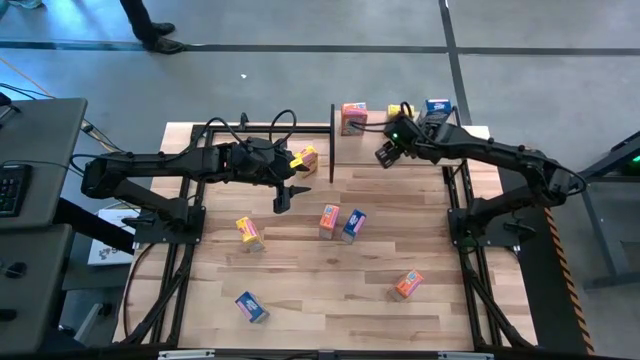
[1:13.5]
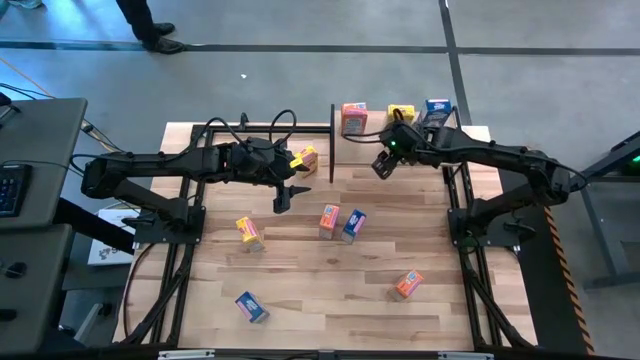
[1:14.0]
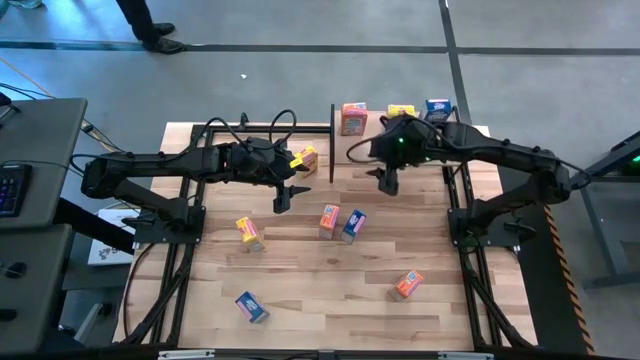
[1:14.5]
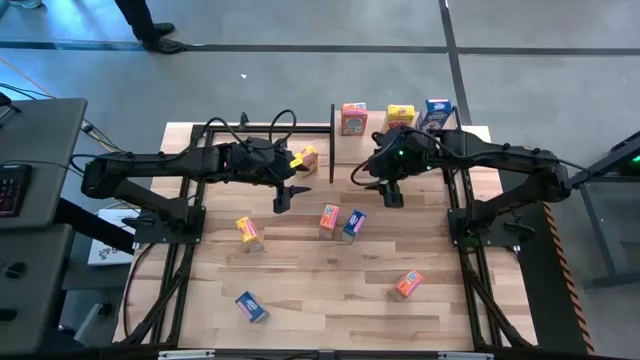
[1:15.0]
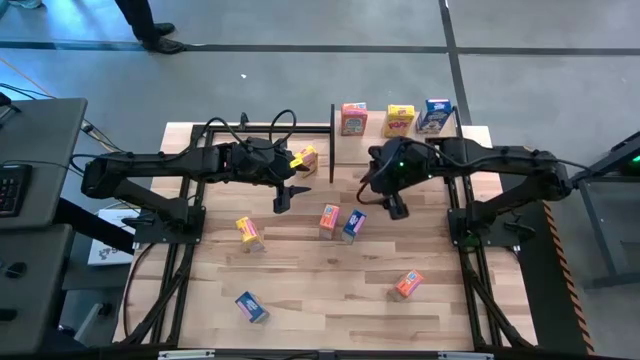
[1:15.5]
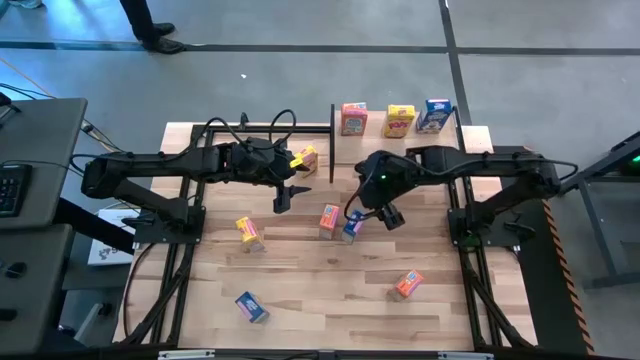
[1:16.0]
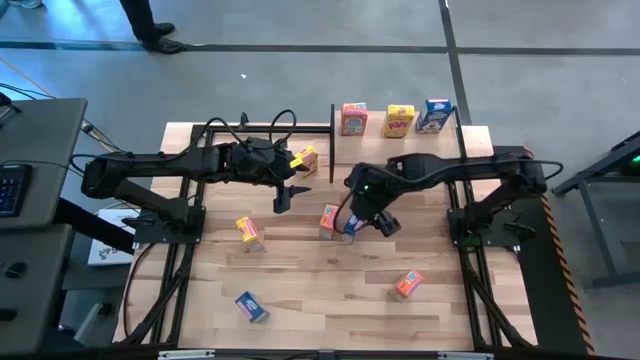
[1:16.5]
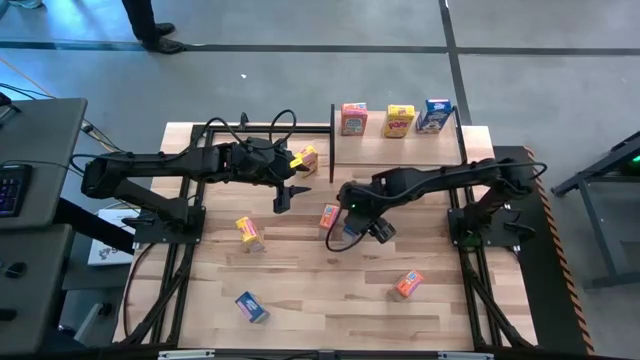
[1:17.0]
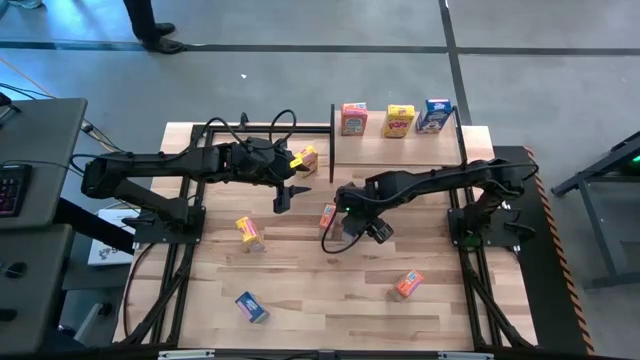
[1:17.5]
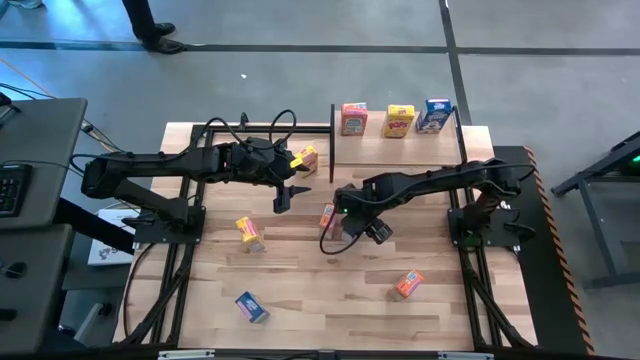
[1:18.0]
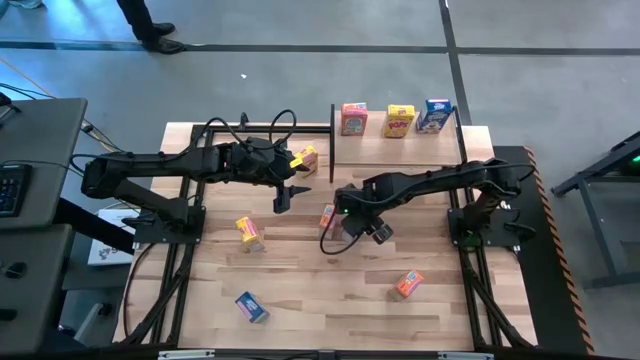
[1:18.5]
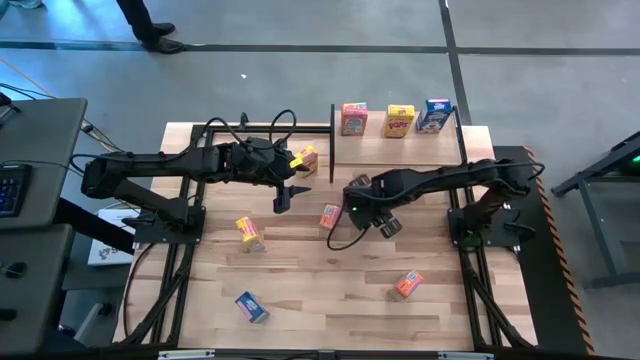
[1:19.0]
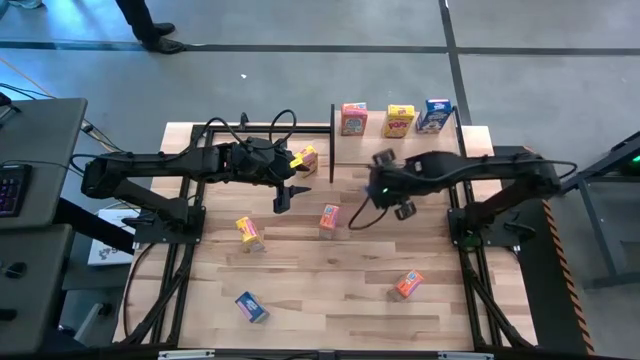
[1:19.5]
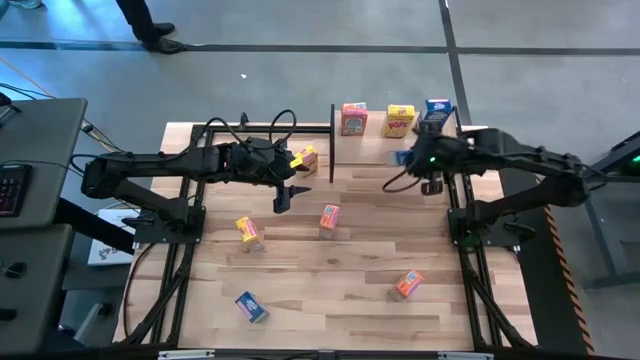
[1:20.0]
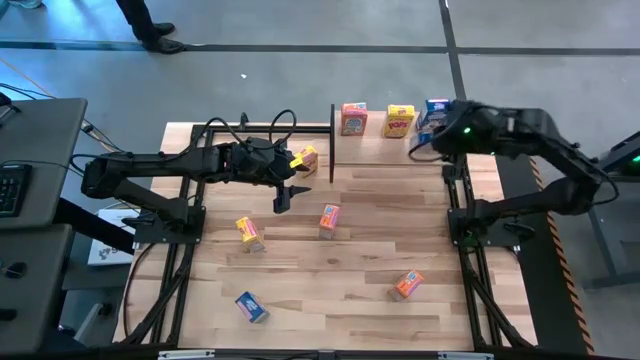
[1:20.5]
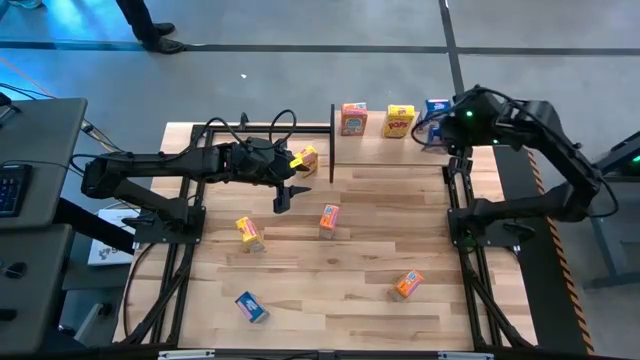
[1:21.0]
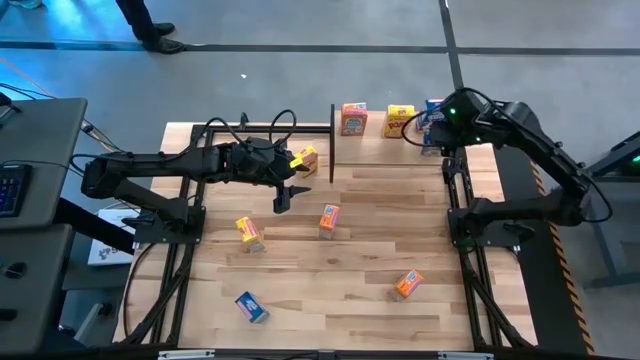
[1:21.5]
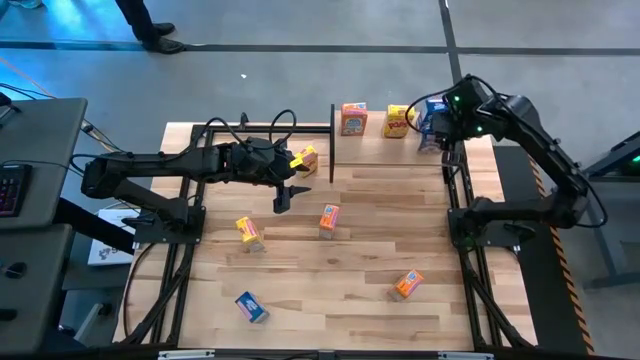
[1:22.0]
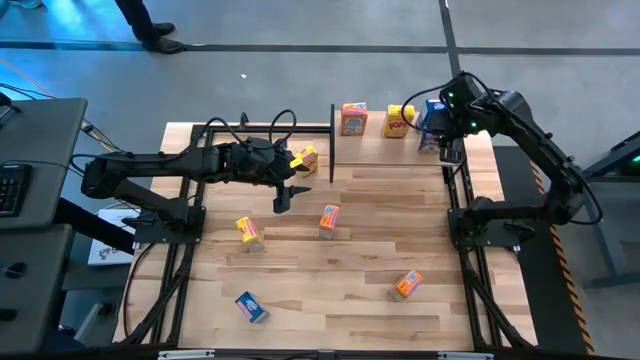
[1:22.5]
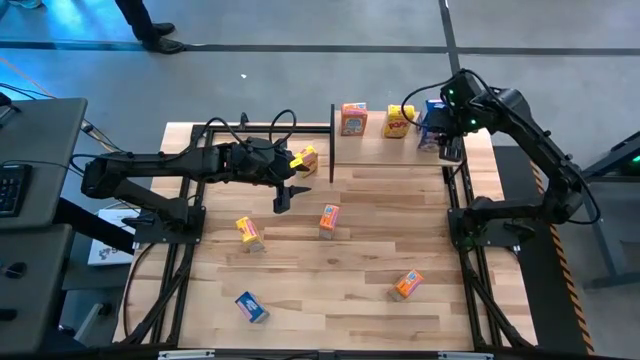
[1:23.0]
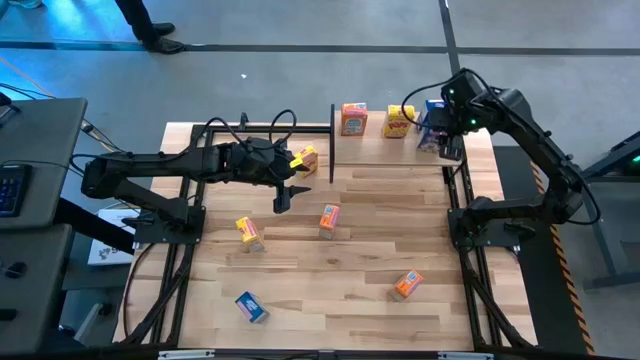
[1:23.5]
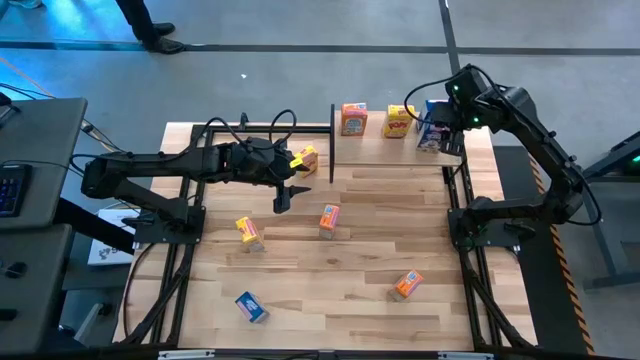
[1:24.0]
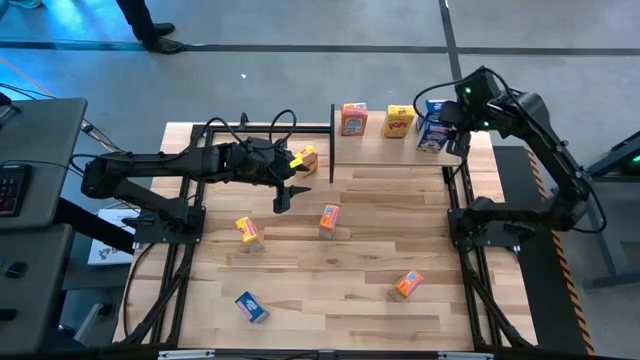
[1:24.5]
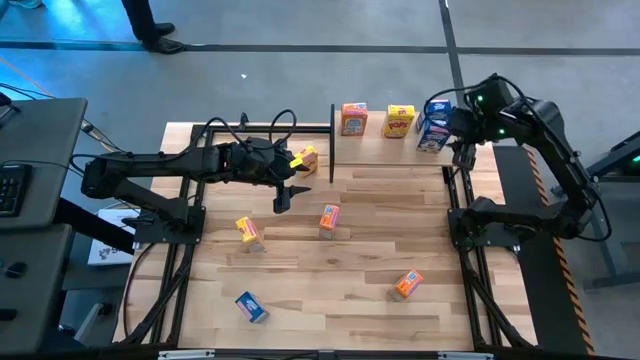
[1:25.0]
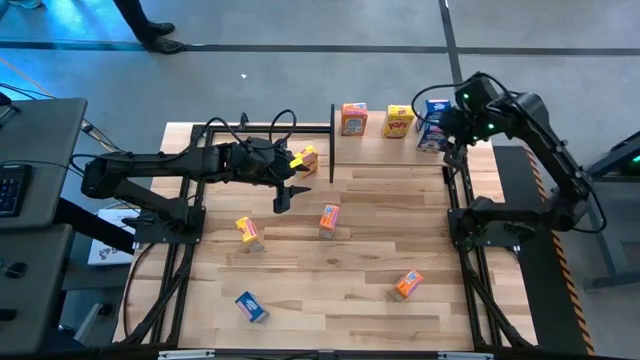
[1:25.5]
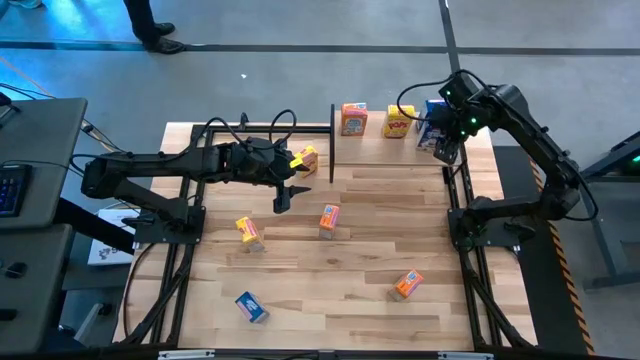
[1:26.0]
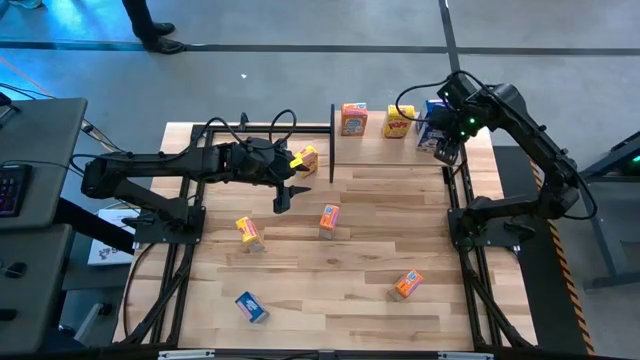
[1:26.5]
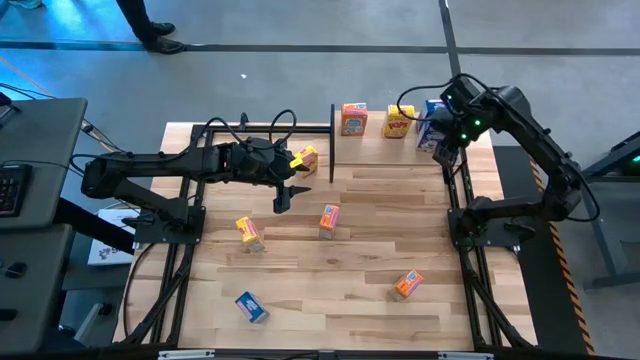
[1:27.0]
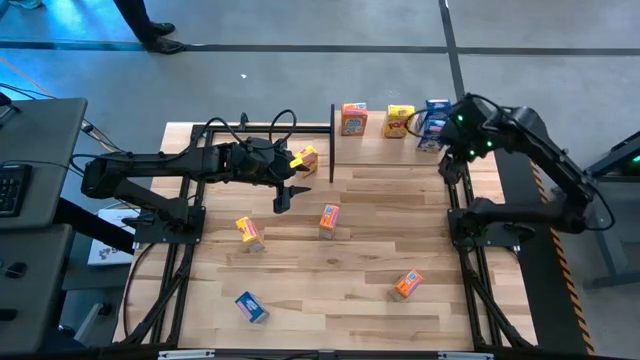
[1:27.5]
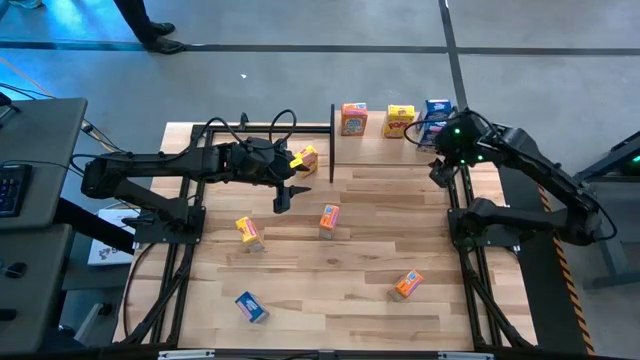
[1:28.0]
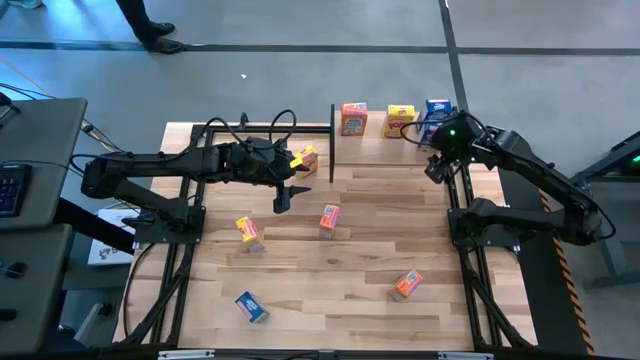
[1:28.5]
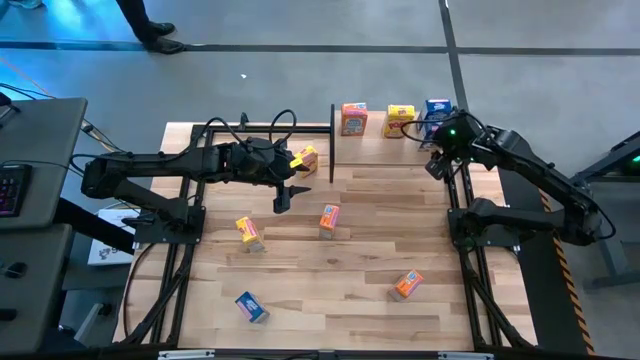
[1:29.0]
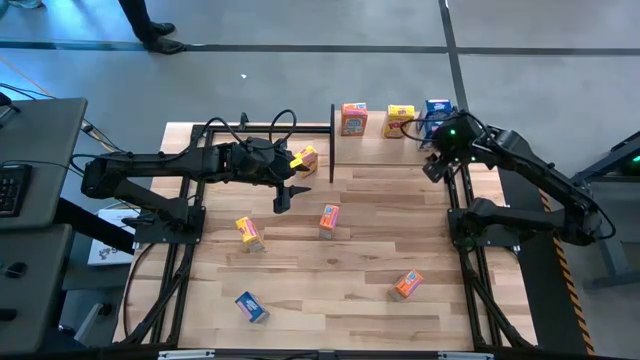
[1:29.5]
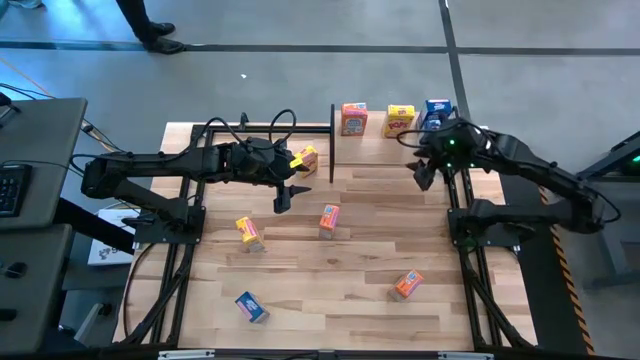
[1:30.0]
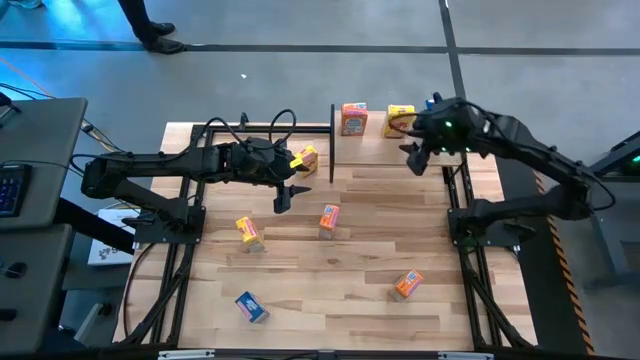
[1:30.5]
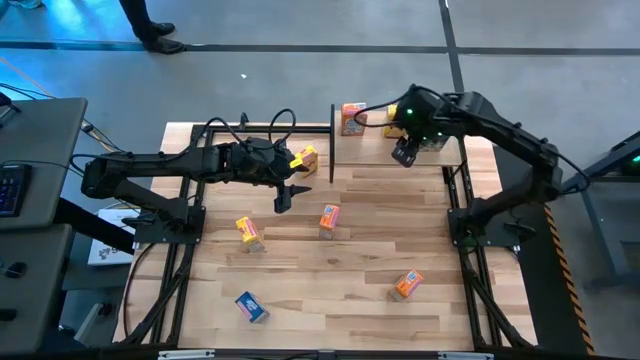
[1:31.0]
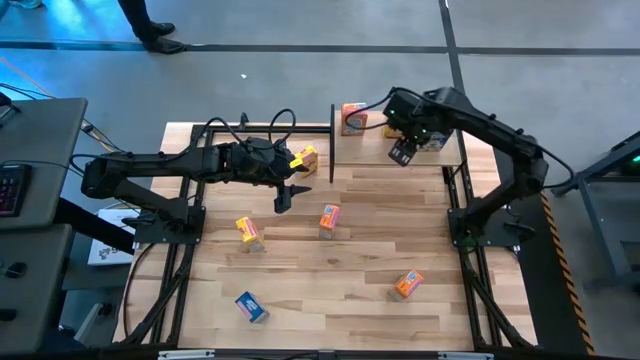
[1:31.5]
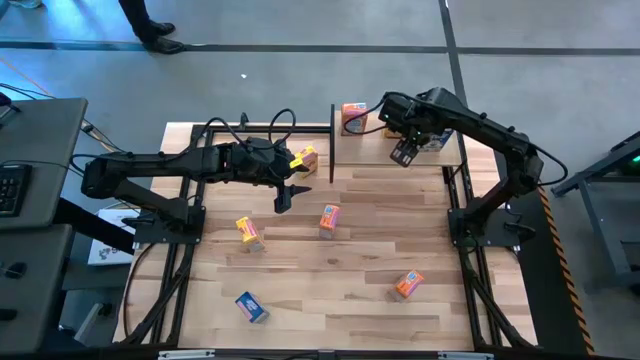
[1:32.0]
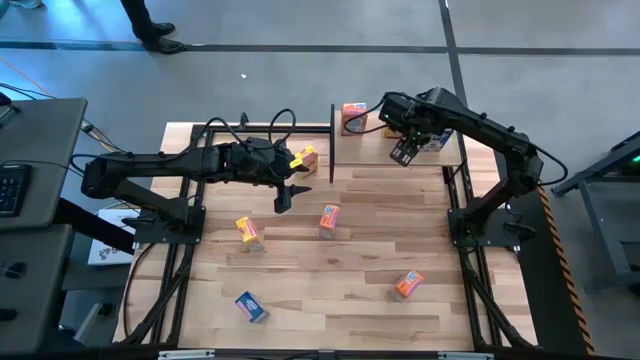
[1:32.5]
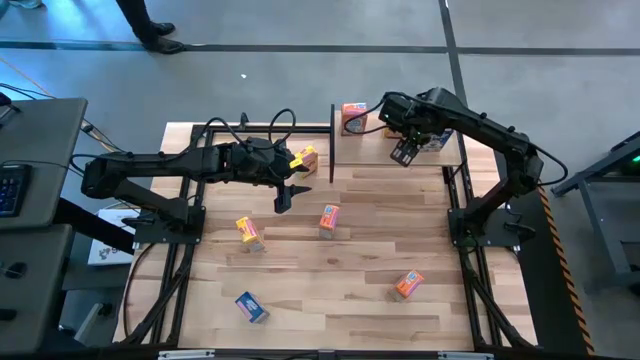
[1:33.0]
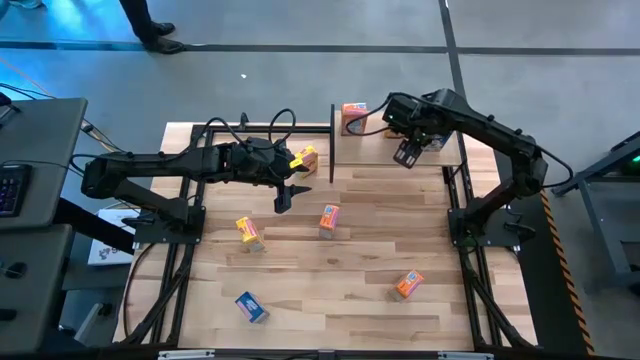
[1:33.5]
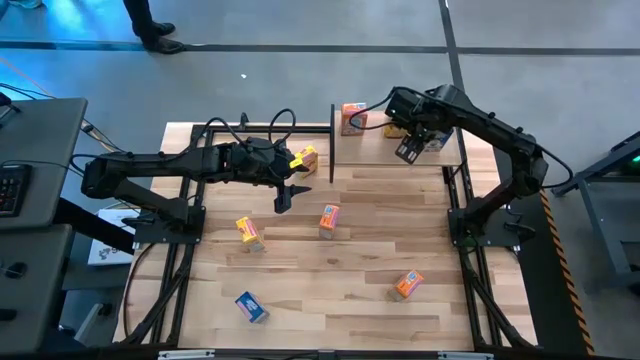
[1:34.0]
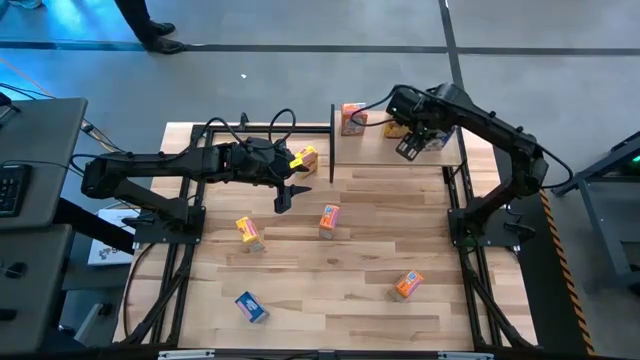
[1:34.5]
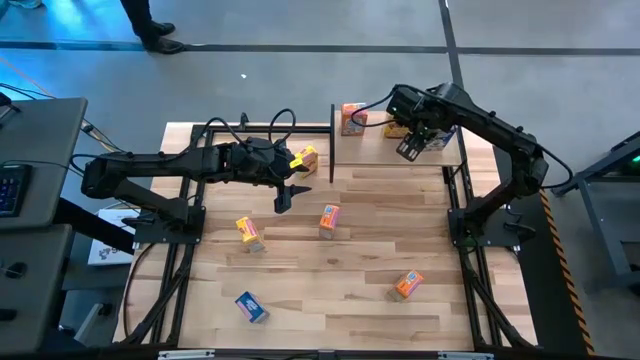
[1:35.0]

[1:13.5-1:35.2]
Task: Stack cereal on shelf
Put the top blue cereal box on the shelf aligned with the other blue cereal box
